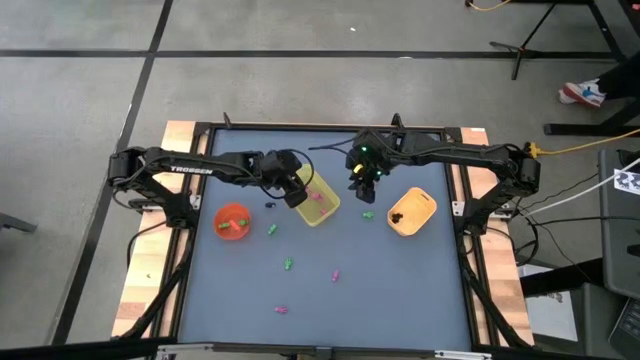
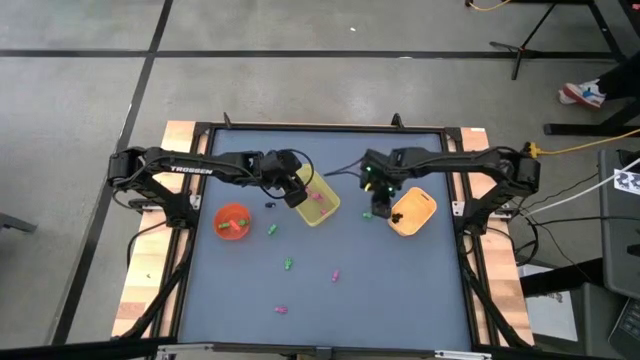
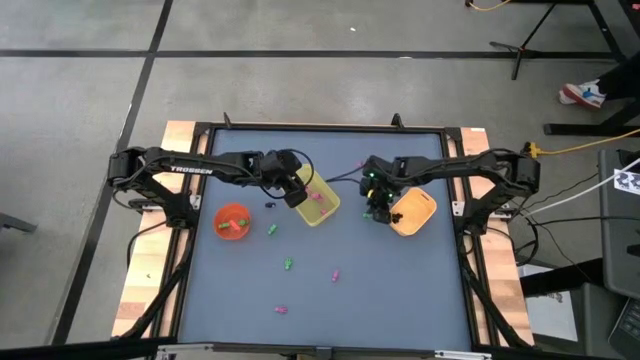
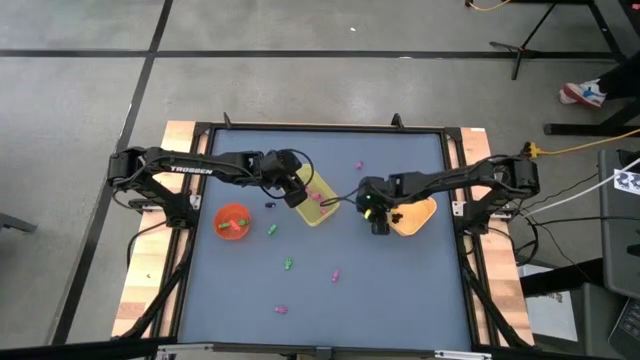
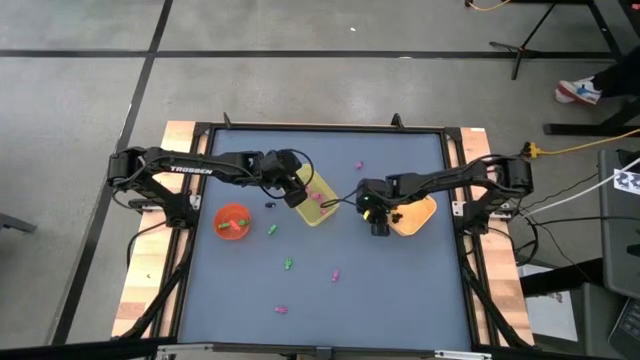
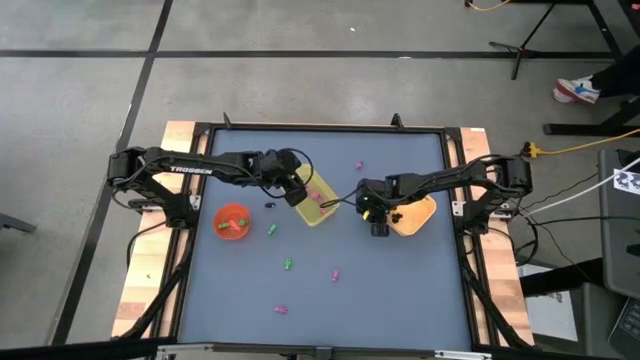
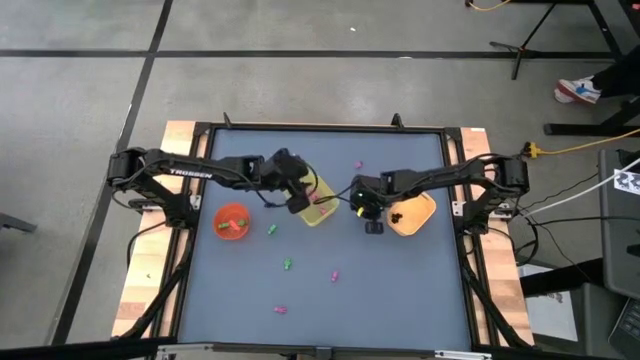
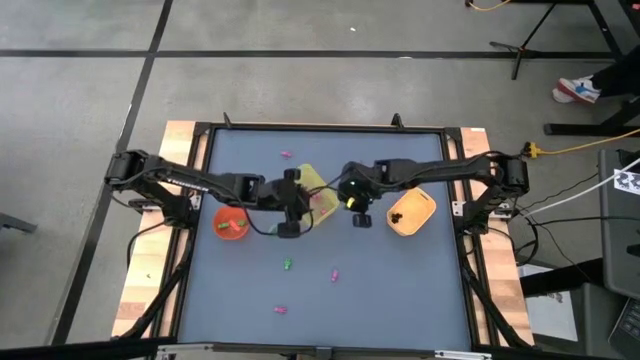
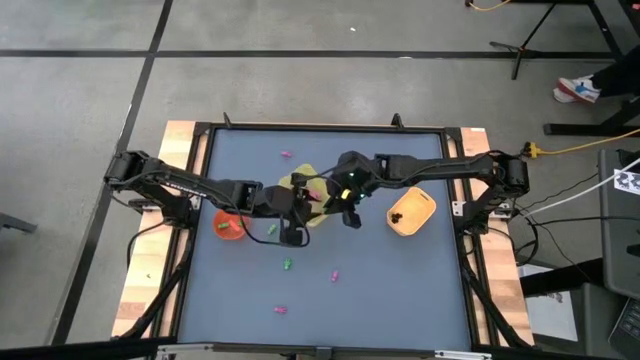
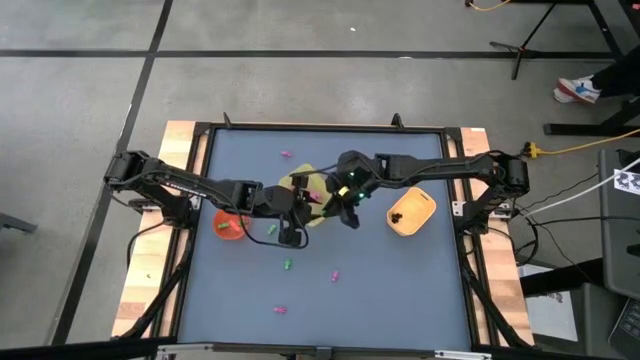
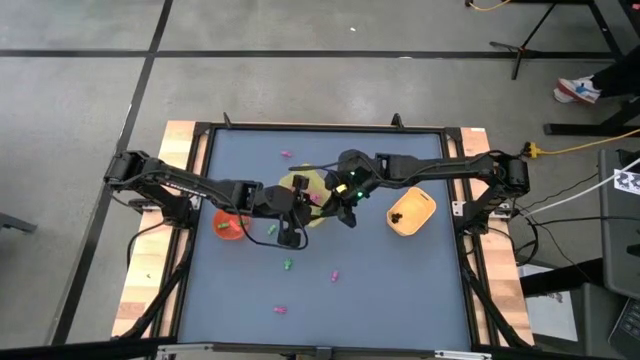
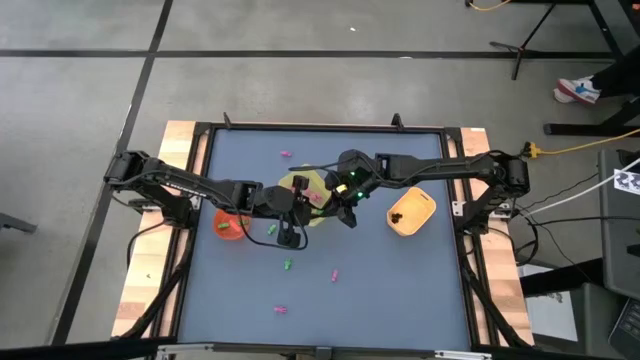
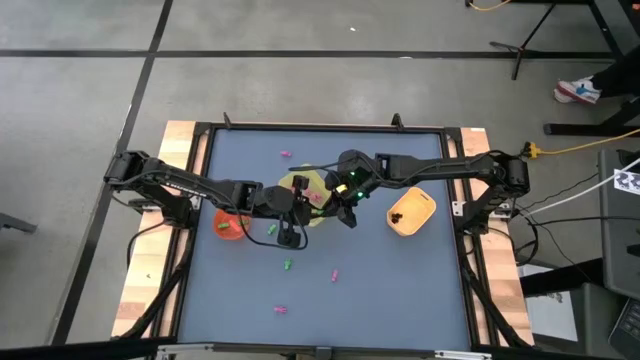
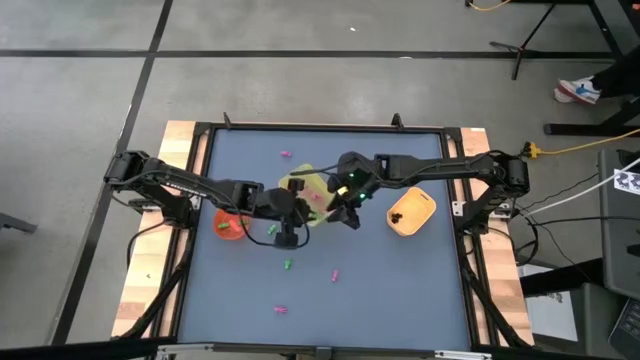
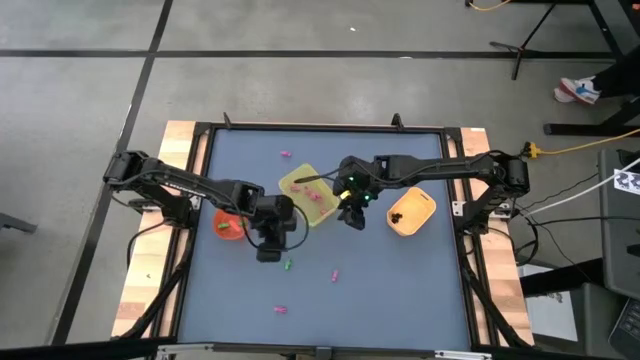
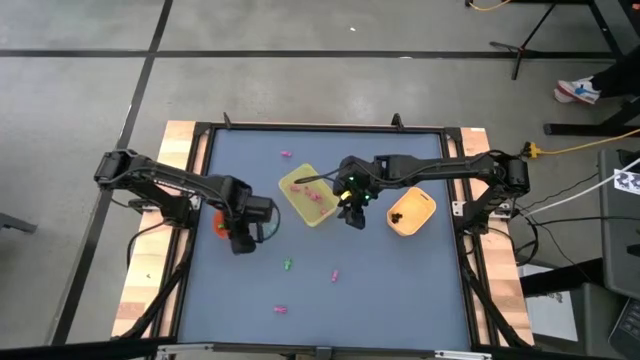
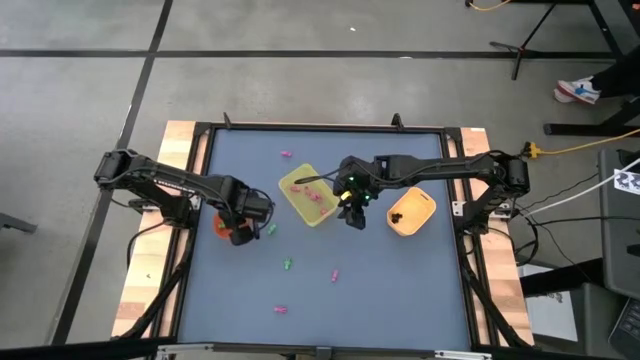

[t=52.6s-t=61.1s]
Task: Sort Halloween decoration
Put the green skeleton toy into the orange bin

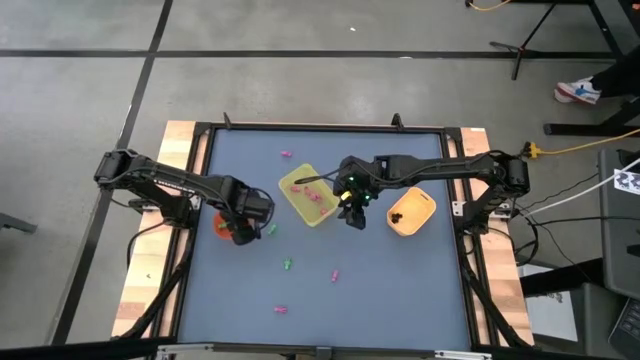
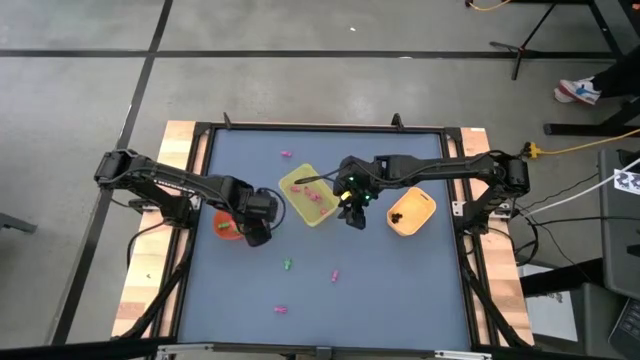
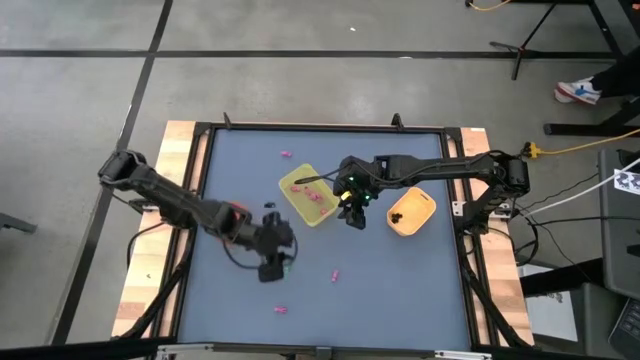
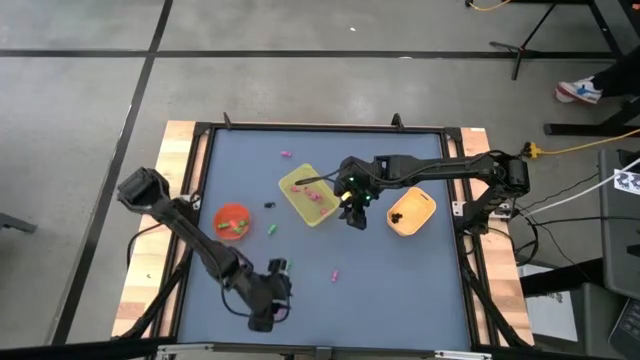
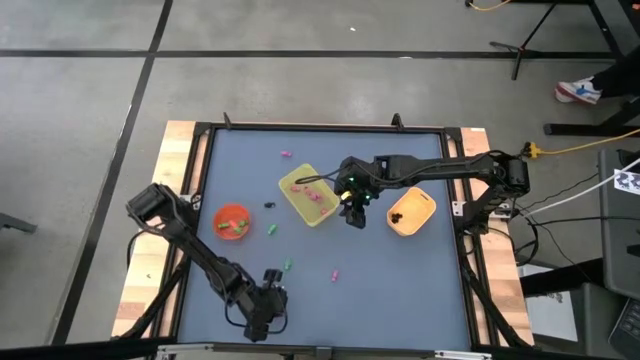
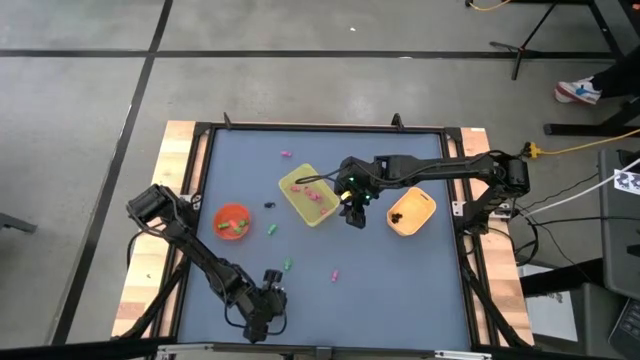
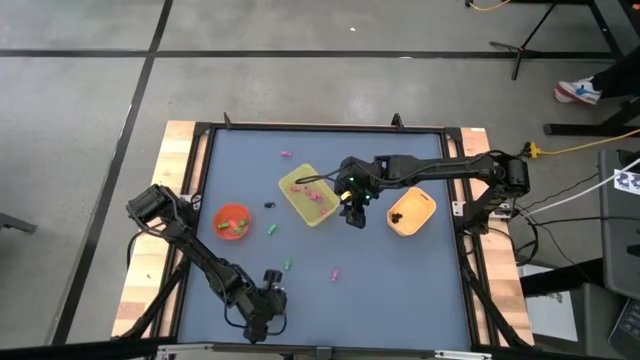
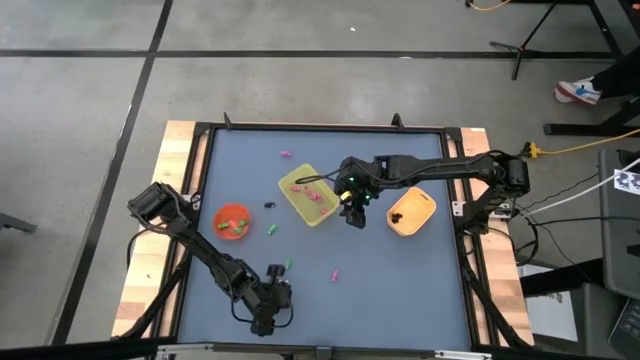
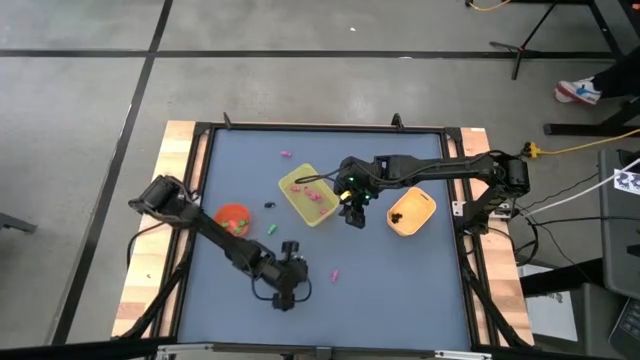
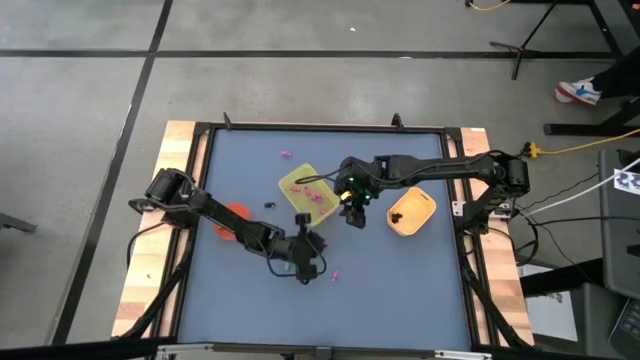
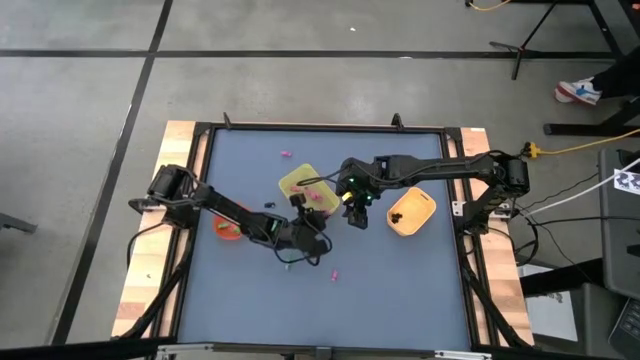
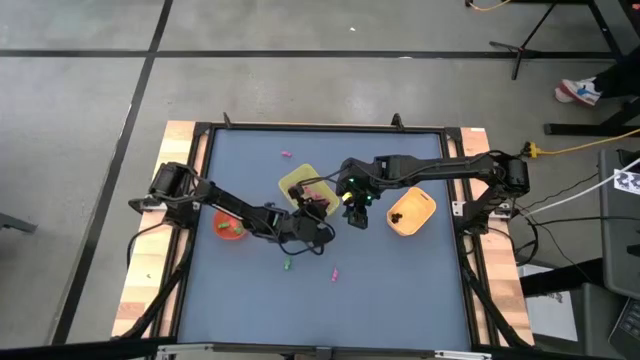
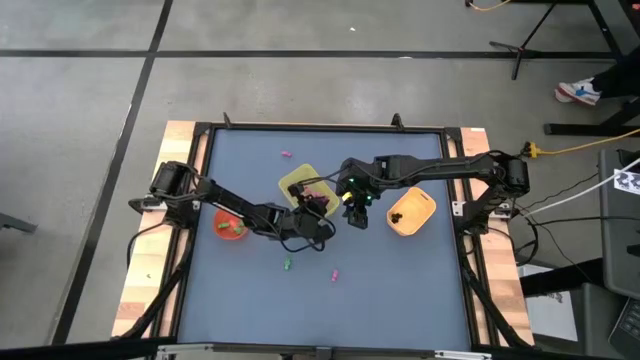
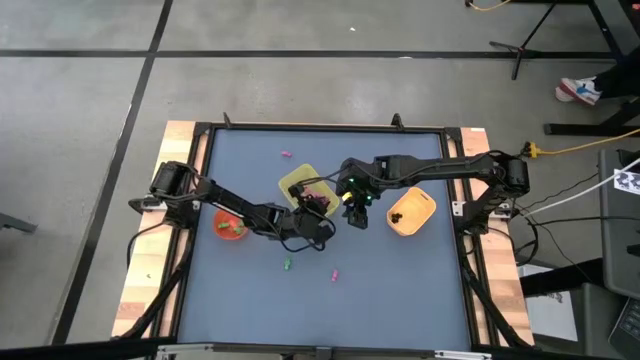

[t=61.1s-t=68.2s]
Put the pink skeleton toy into the yellow bin

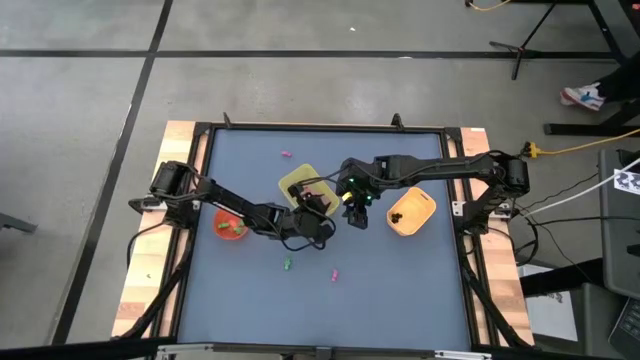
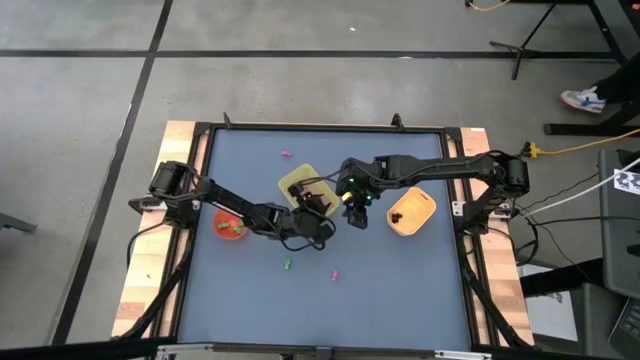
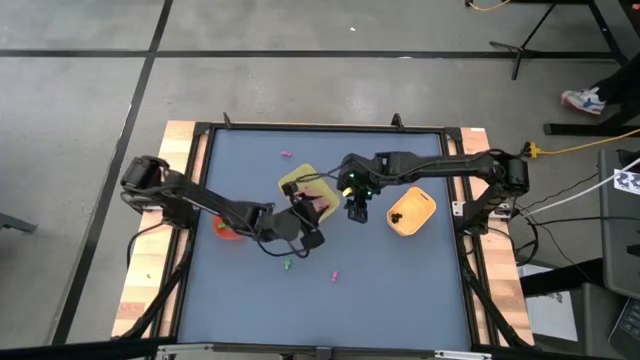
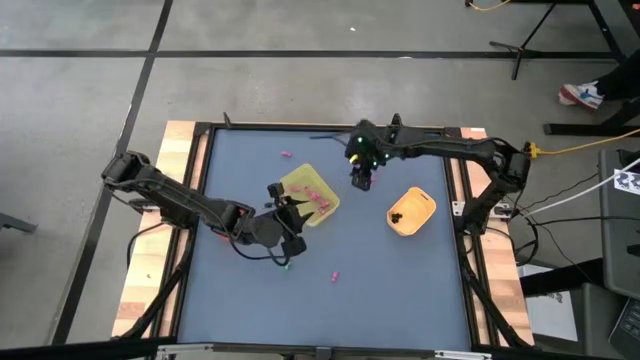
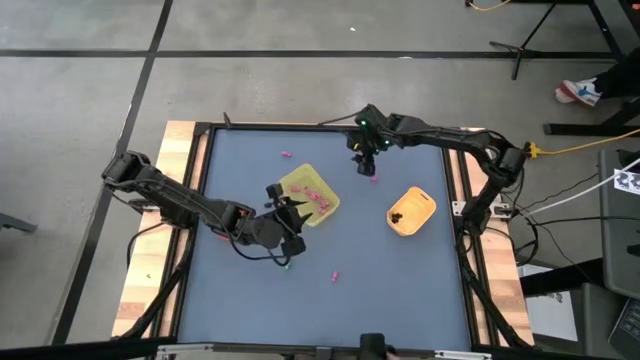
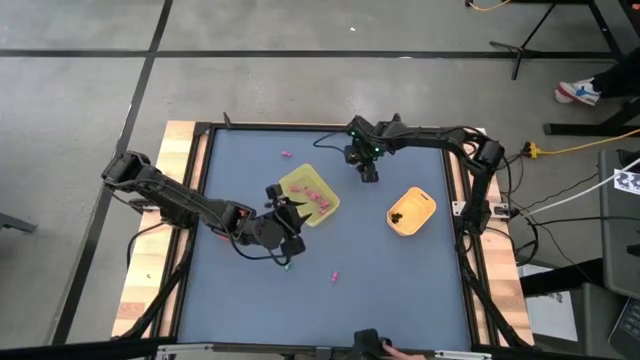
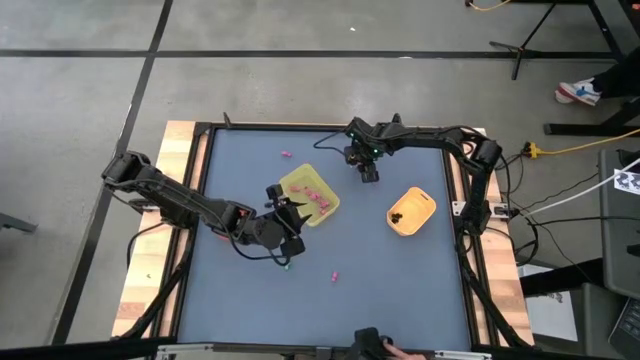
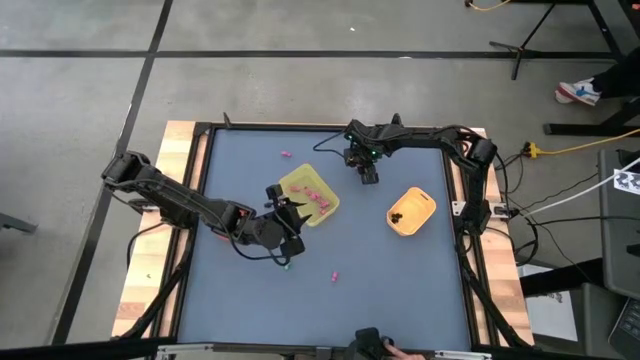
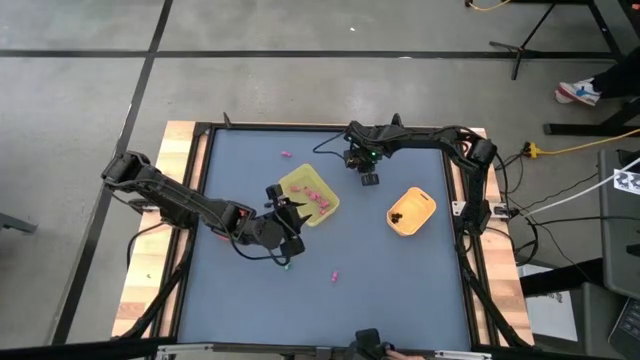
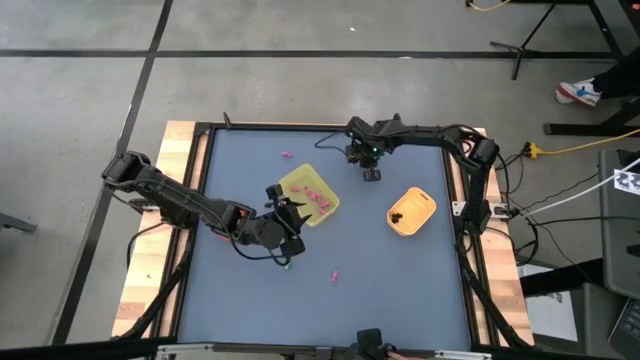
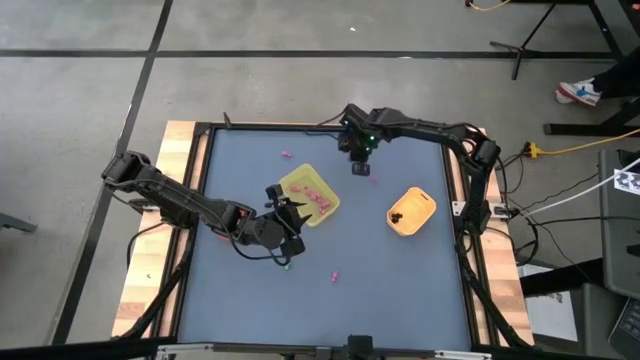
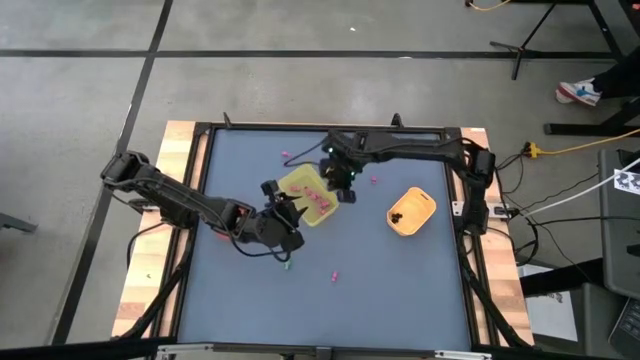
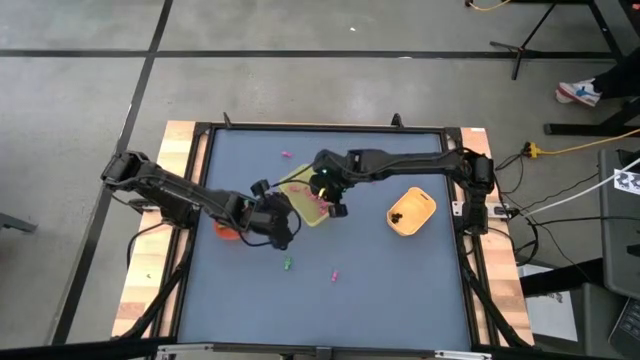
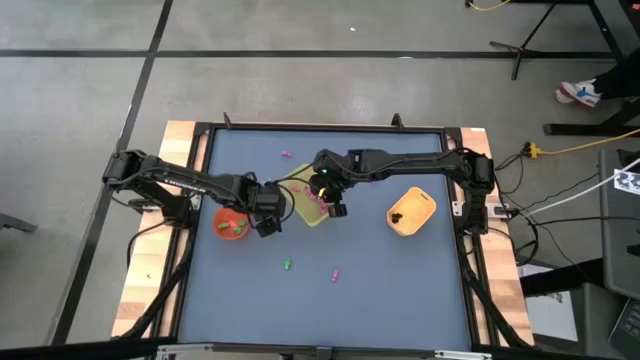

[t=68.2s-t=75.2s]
Put the pink skeleton toy into the yellow bin
